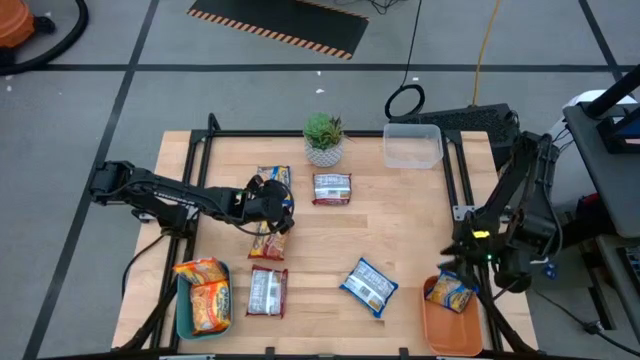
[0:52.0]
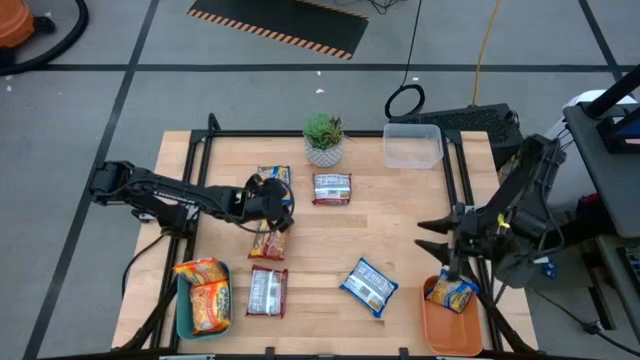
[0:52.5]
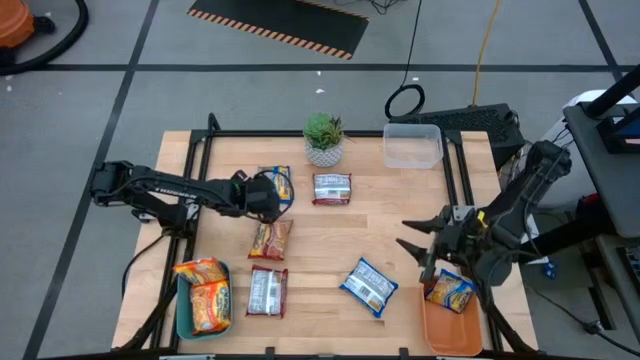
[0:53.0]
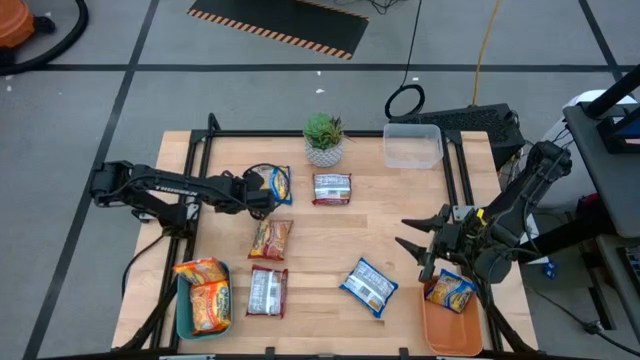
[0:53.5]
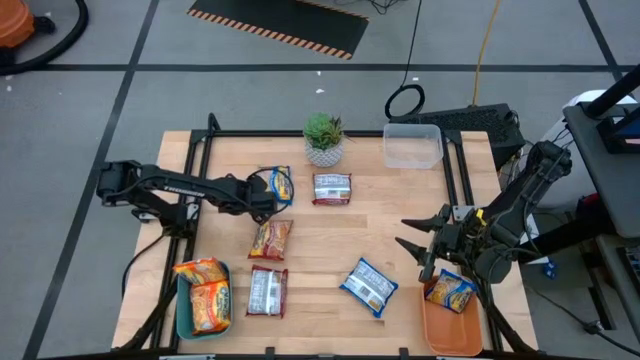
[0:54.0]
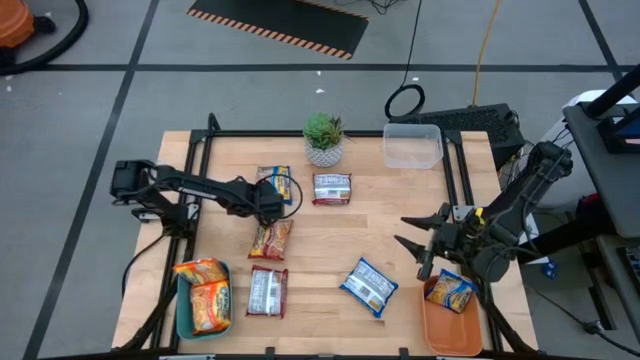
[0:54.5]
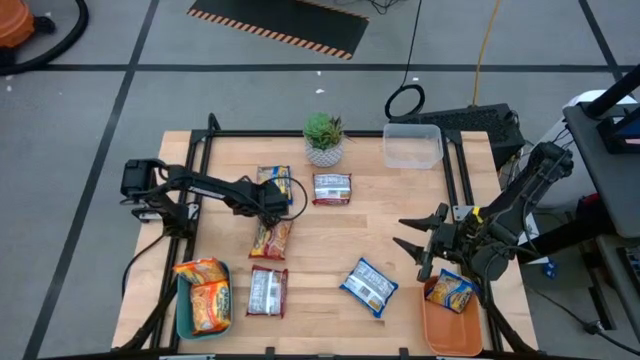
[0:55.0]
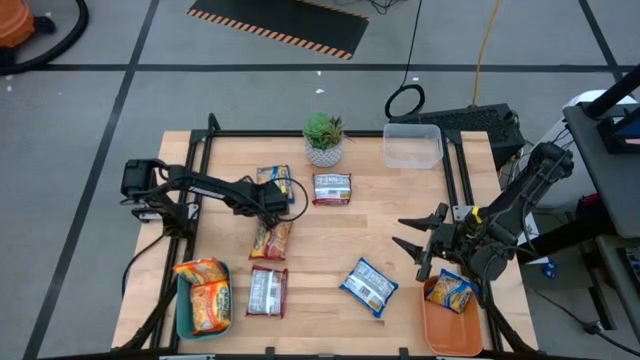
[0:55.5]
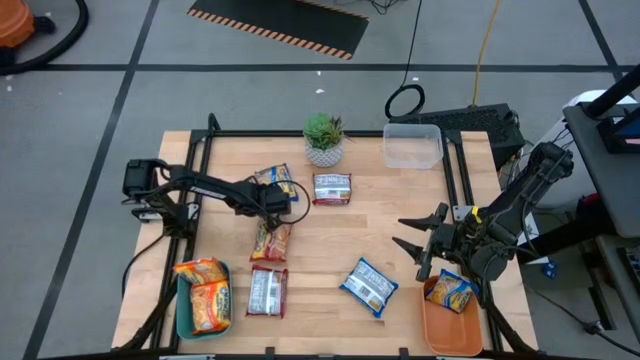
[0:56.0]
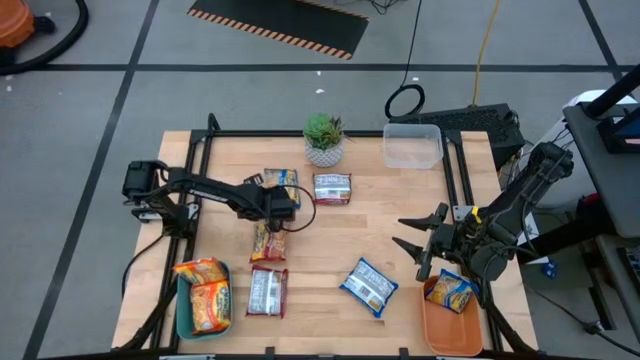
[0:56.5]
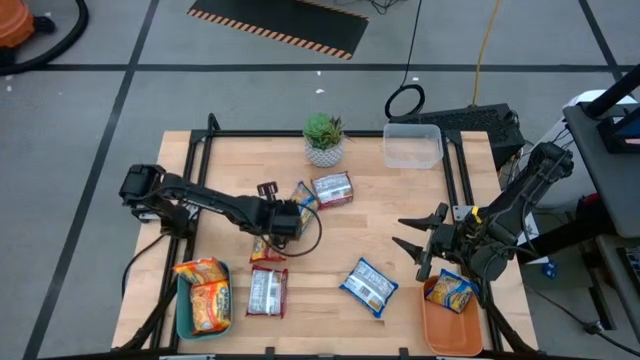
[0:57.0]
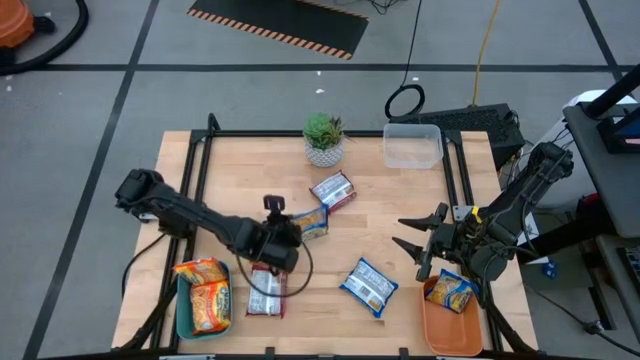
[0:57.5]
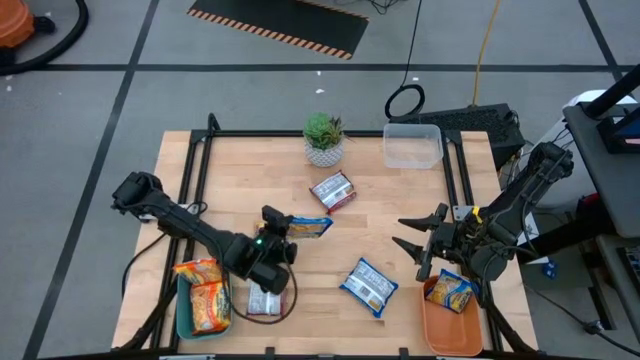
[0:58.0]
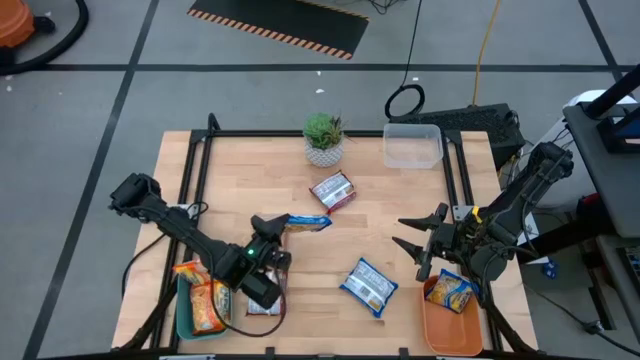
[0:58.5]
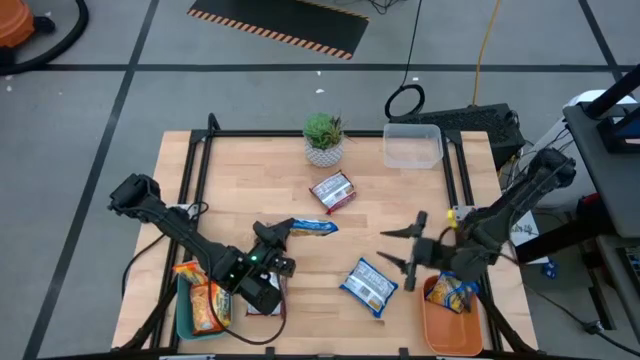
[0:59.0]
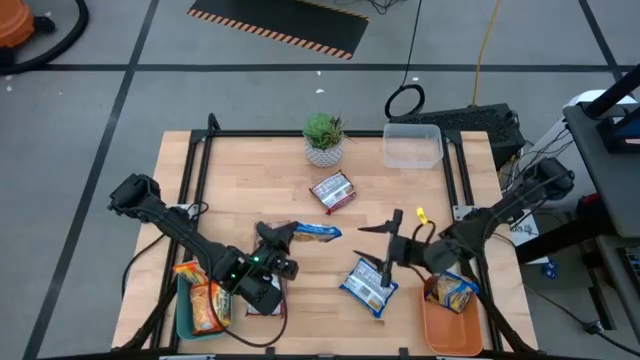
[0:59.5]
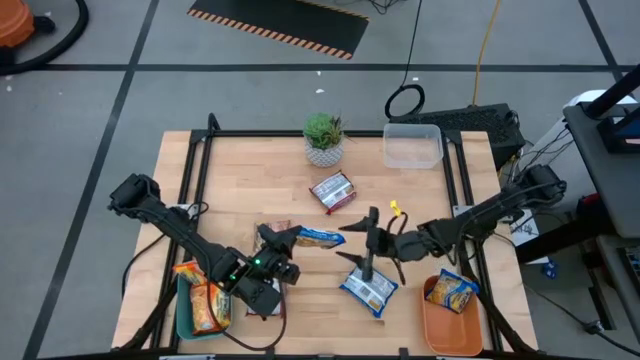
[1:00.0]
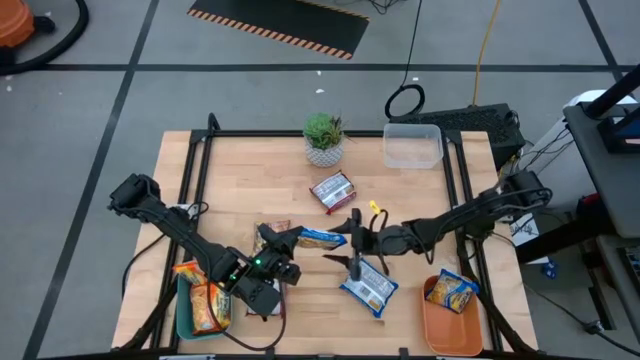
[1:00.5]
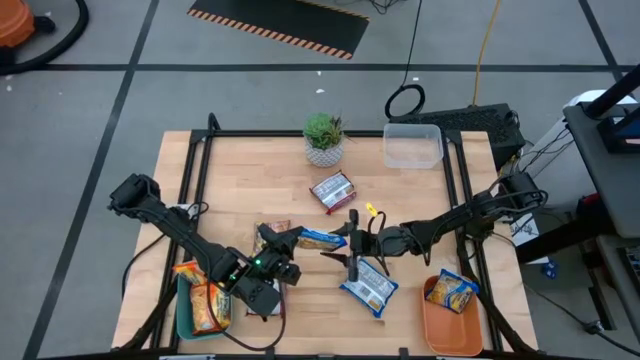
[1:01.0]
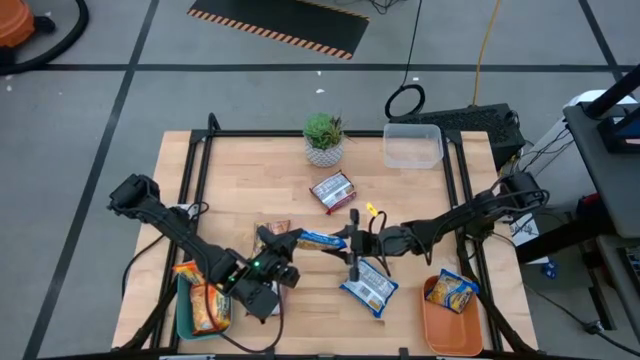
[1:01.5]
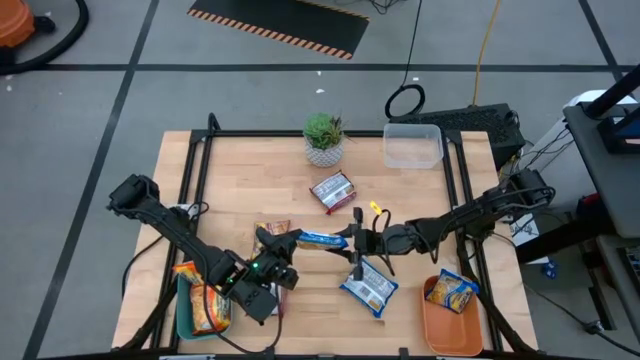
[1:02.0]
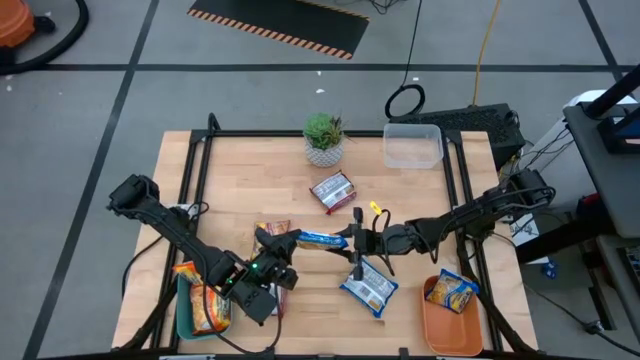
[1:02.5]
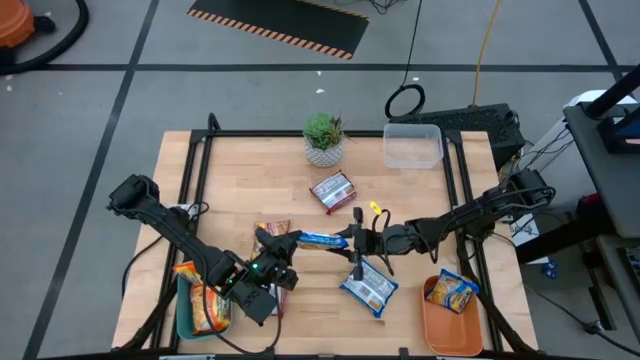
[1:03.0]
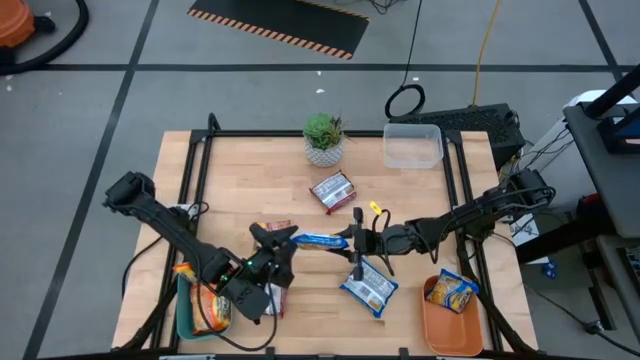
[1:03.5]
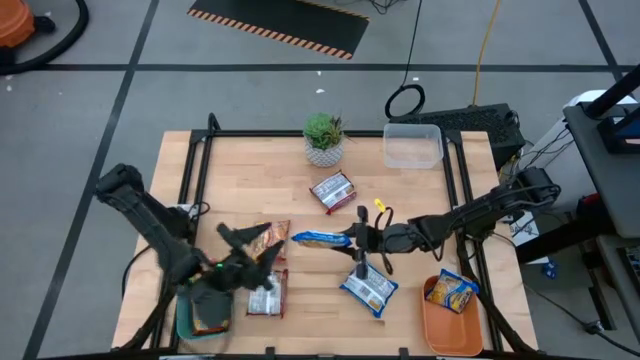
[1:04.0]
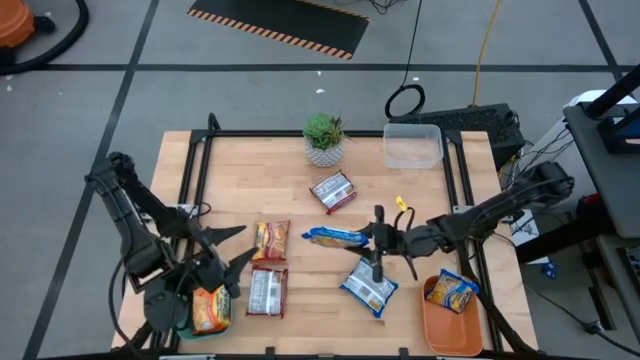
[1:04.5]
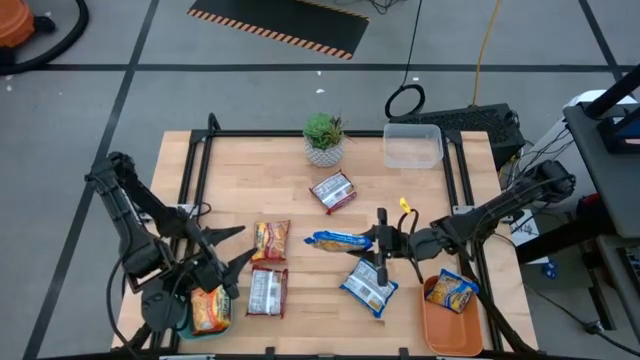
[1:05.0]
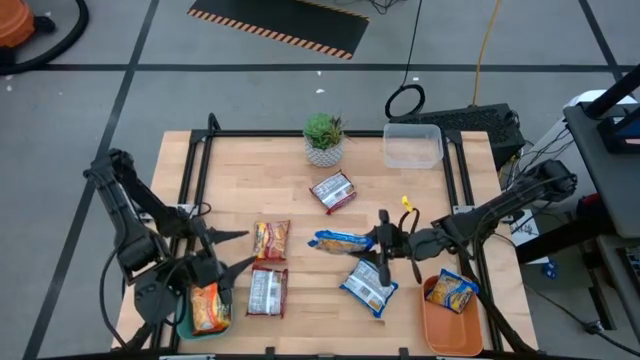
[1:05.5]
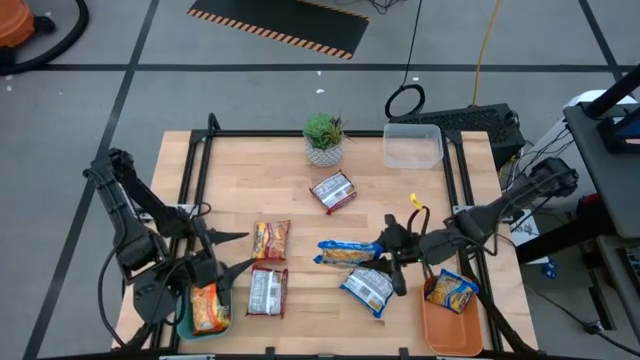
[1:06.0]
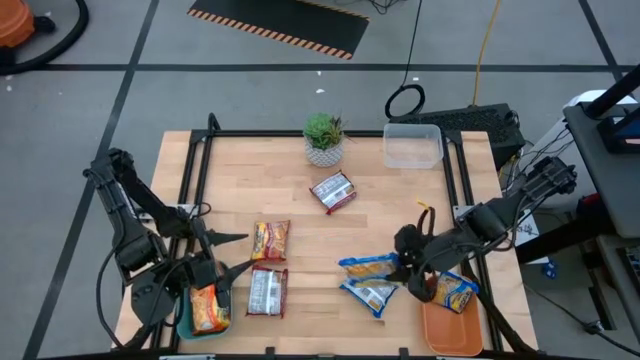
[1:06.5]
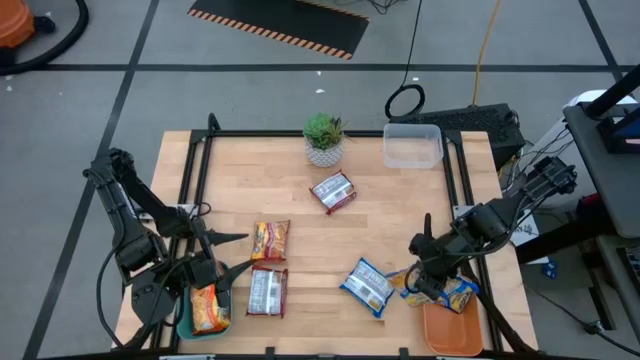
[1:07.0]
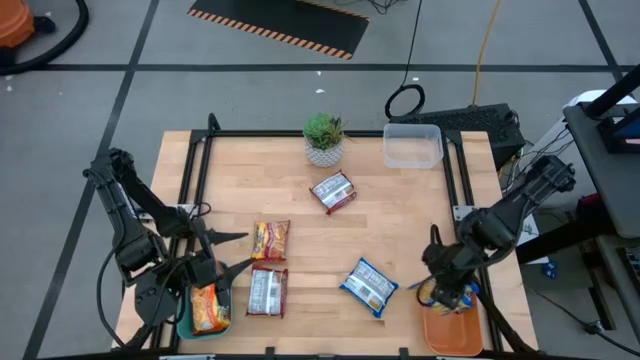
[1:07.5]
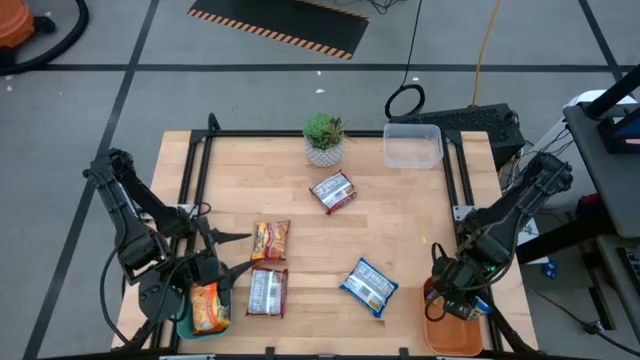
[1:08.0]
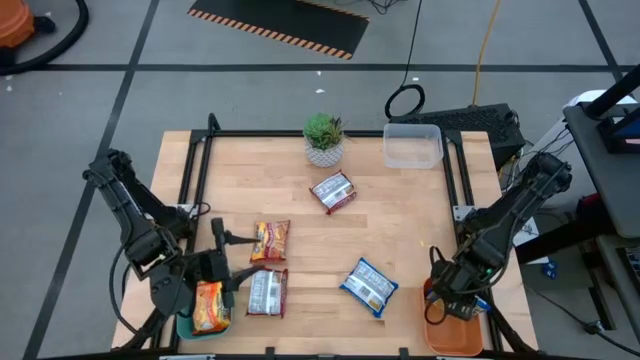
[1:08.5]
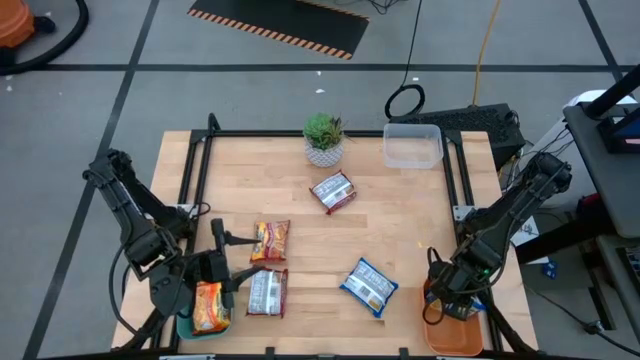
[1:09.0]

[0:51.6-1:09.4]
Task: Sort Maruchan noodles
Put the top blue noodle pack into the orange bin

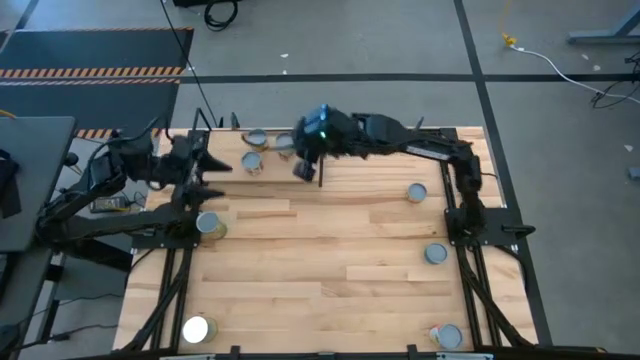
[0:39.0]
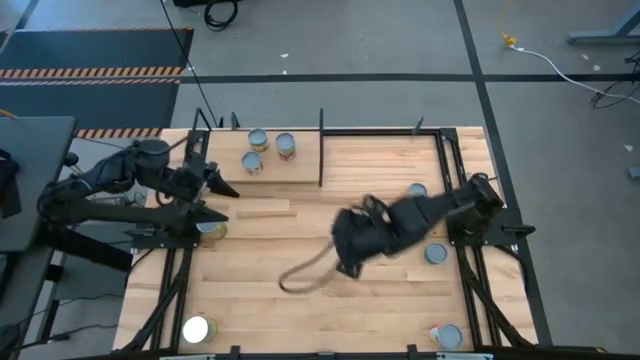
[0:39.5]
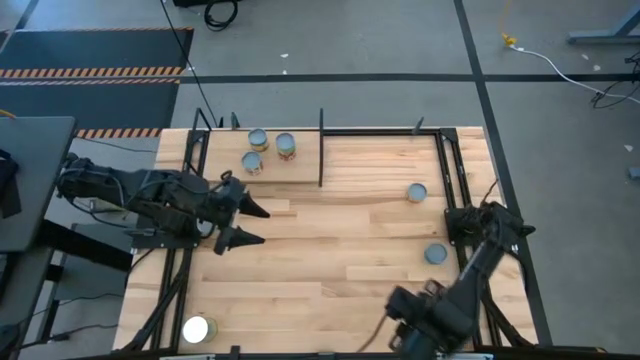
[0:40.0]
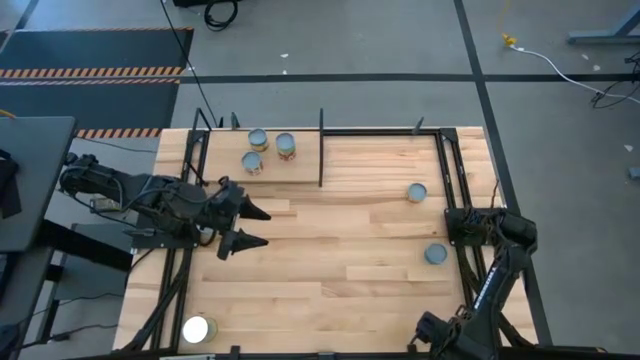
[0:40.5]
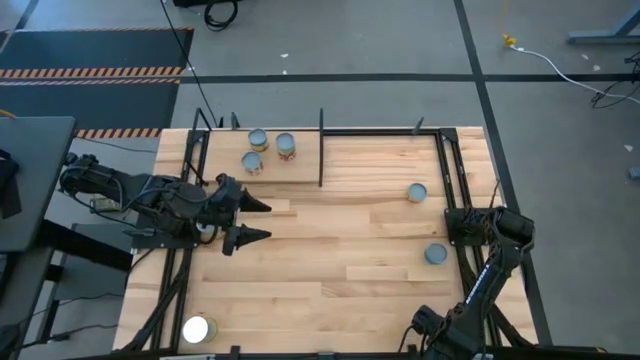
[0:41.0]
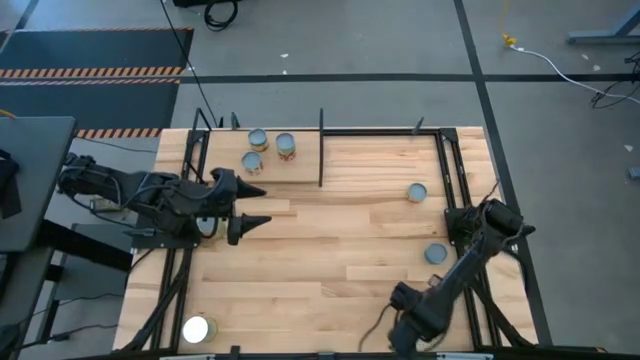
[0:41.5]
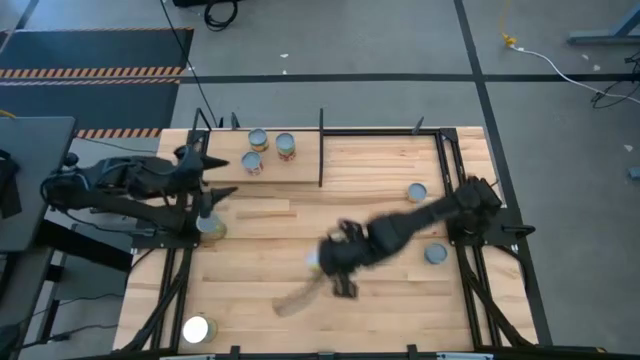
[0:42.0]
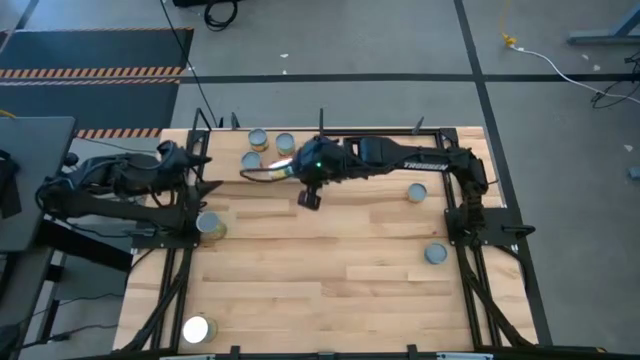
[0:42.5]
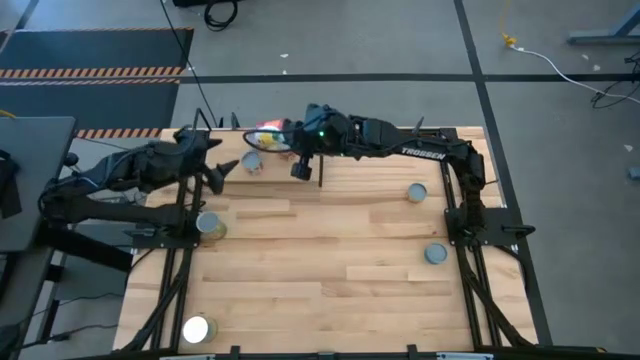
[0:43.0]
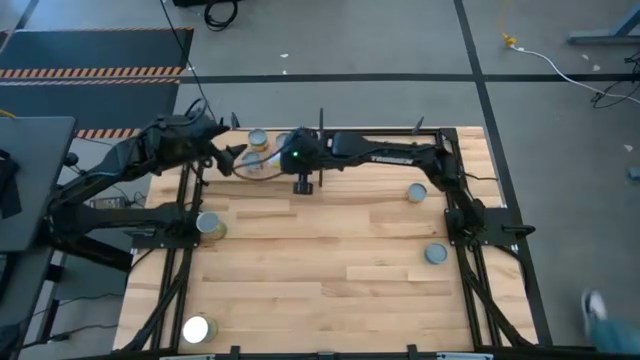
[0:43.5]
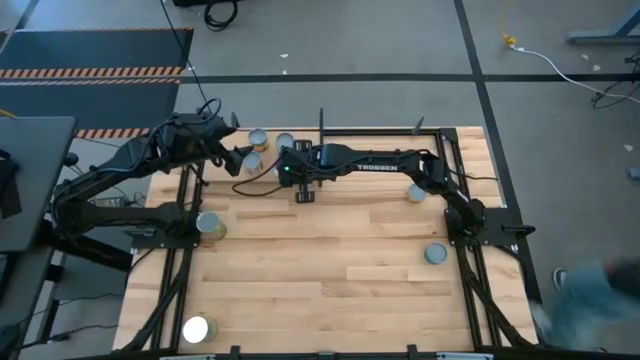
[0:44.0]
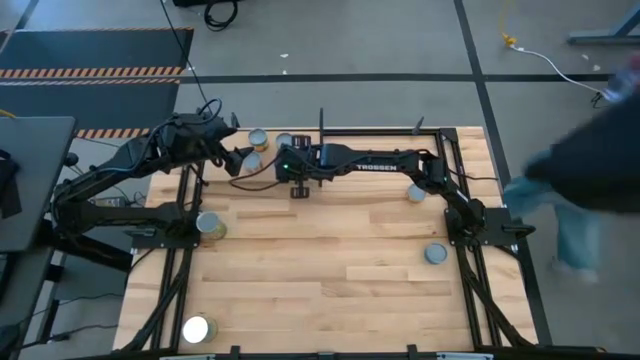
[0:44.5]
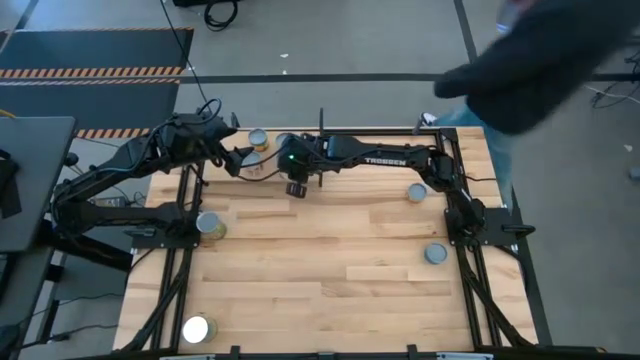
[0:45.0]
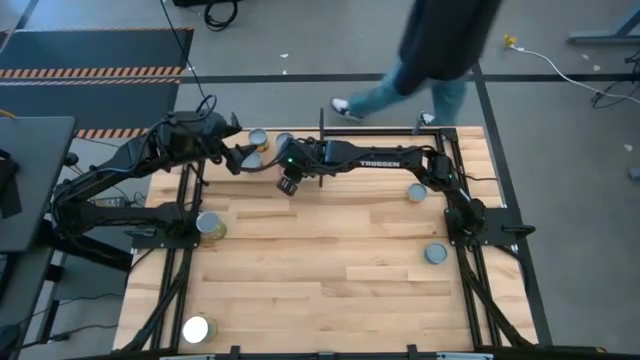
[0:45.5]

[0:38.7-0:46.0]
Task: Pick and place cans onto a shelf
Put the canned mixed fruits on the shelf aligned with the canned spaghetti sauce
